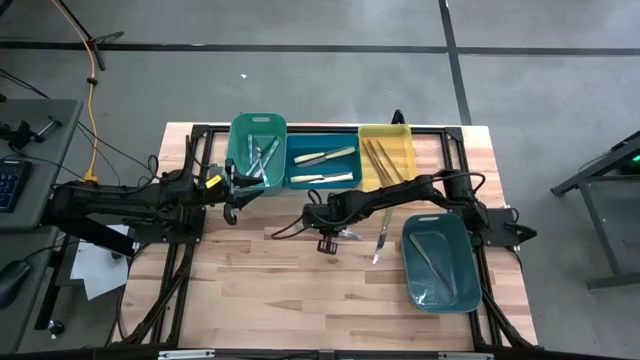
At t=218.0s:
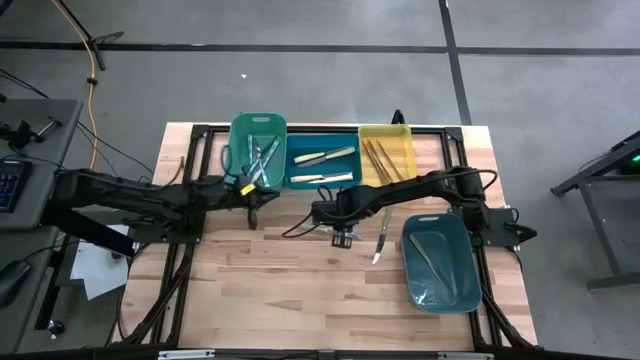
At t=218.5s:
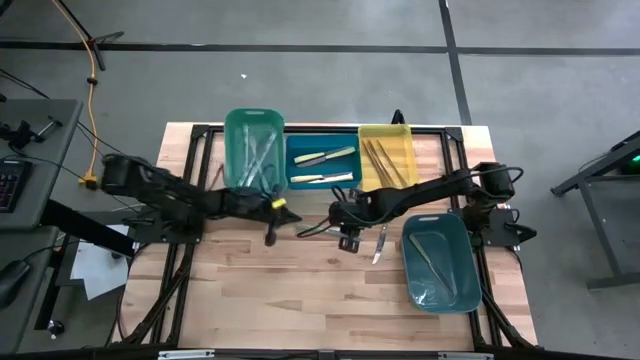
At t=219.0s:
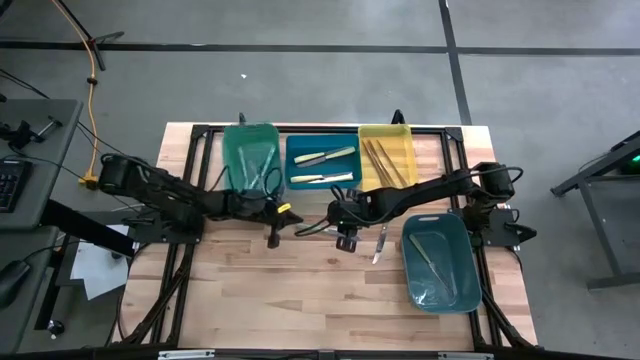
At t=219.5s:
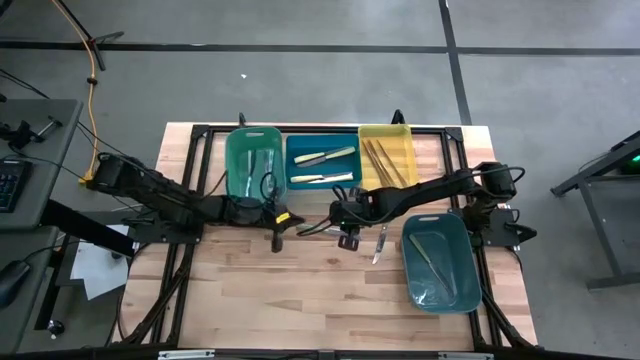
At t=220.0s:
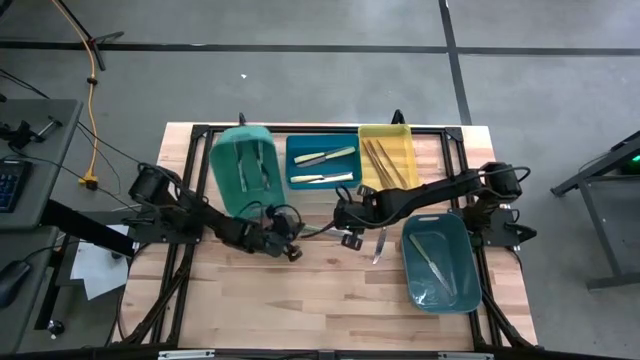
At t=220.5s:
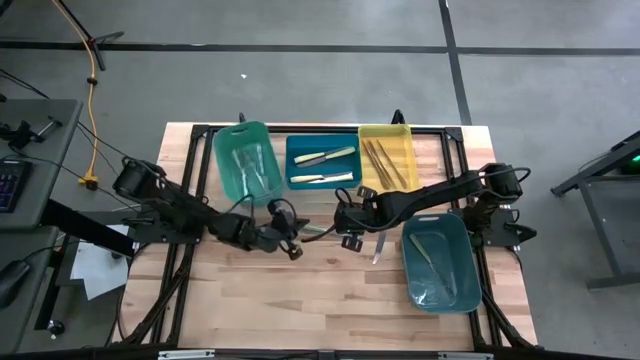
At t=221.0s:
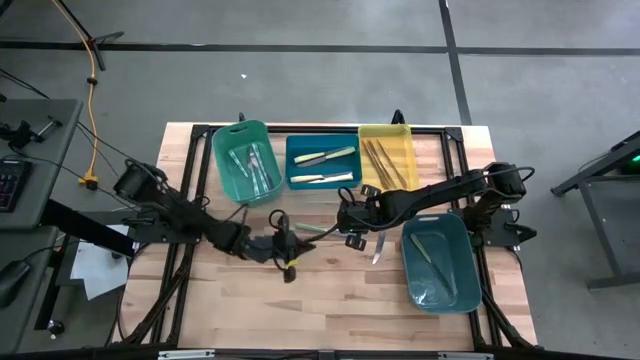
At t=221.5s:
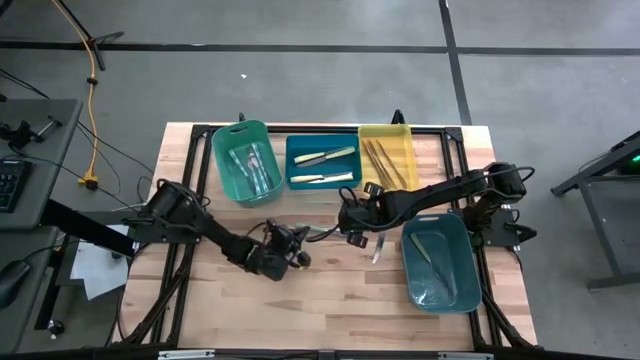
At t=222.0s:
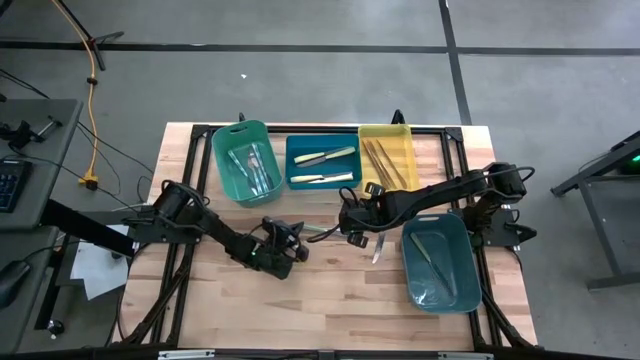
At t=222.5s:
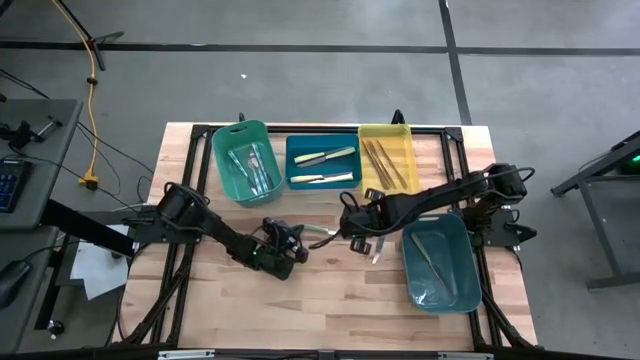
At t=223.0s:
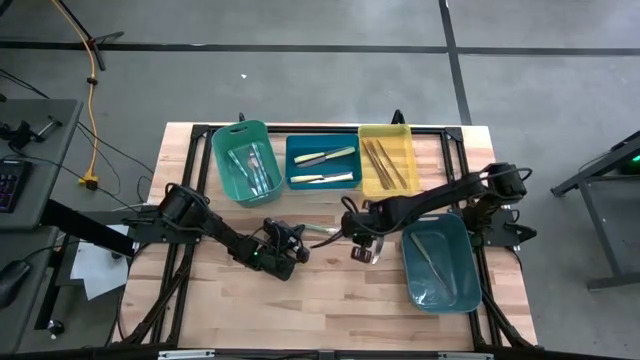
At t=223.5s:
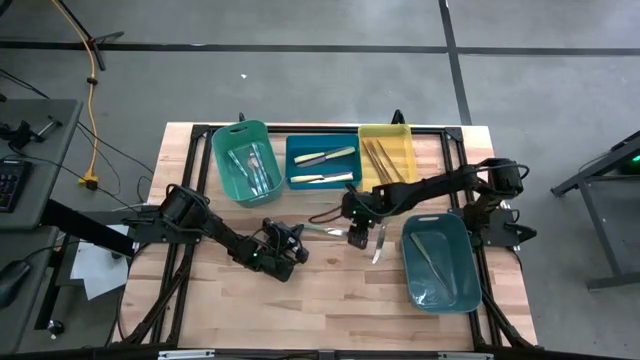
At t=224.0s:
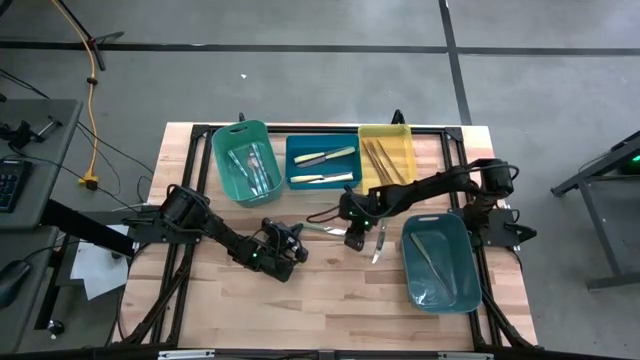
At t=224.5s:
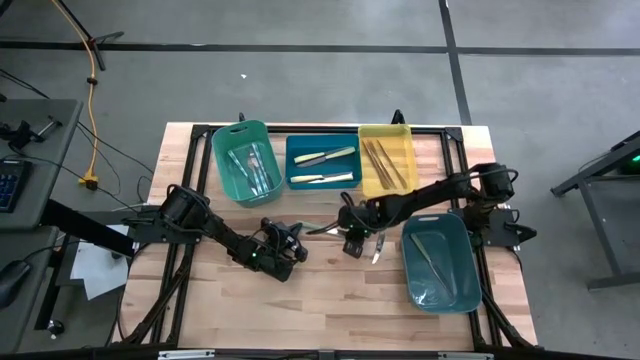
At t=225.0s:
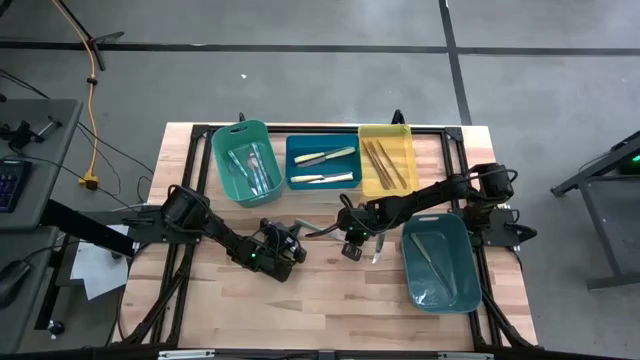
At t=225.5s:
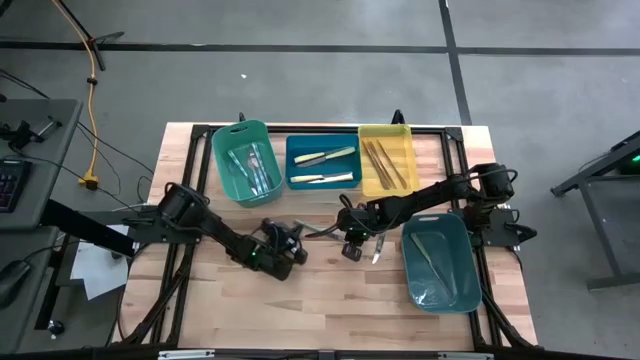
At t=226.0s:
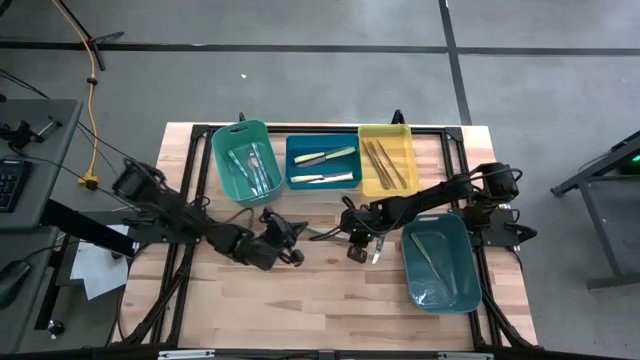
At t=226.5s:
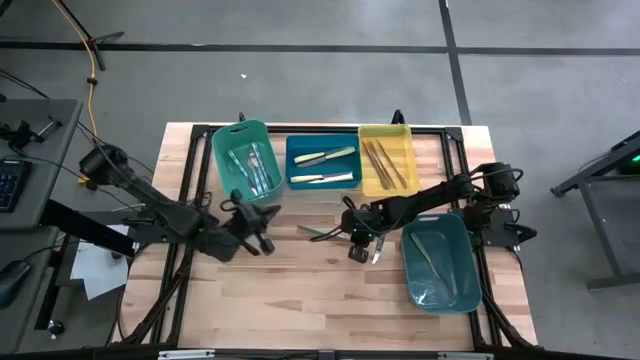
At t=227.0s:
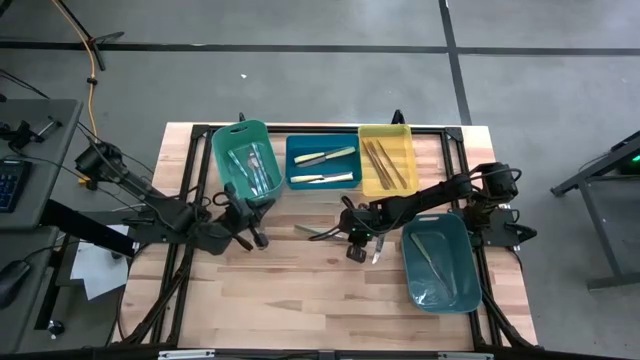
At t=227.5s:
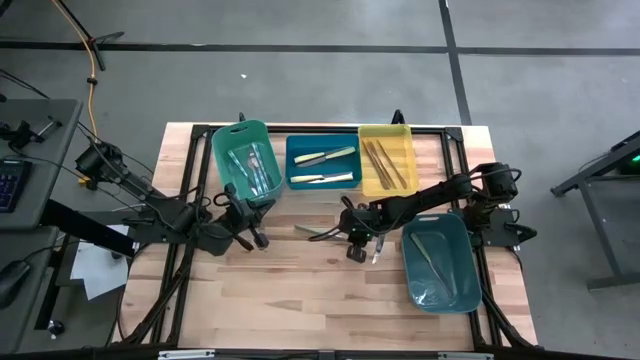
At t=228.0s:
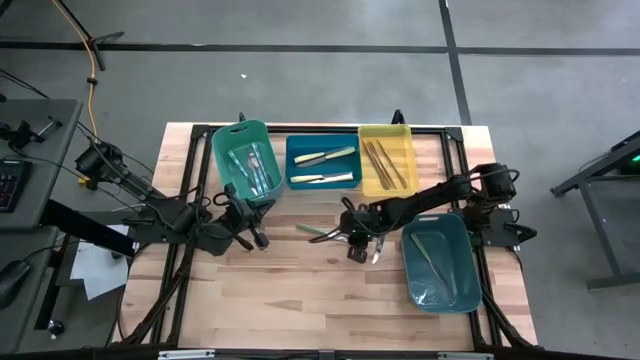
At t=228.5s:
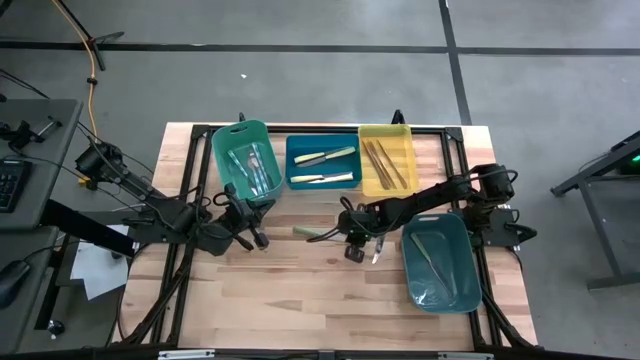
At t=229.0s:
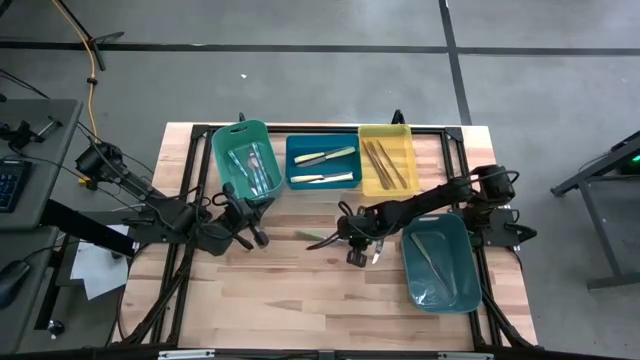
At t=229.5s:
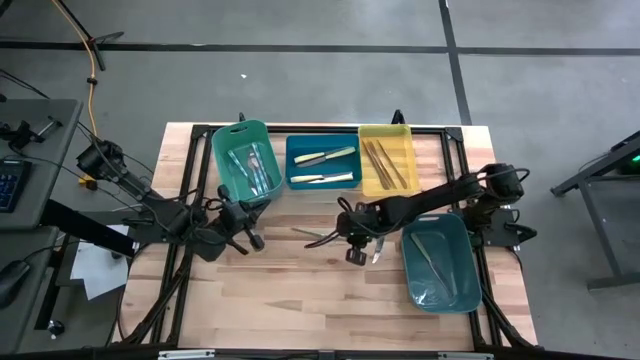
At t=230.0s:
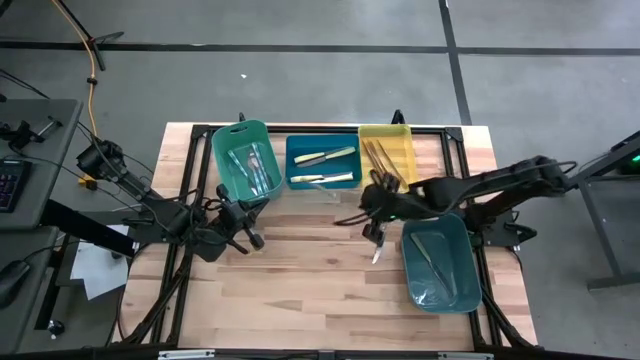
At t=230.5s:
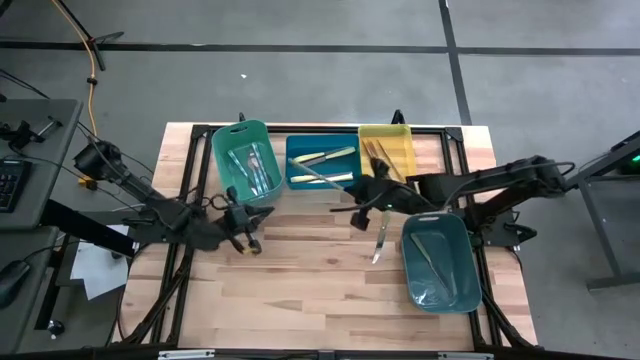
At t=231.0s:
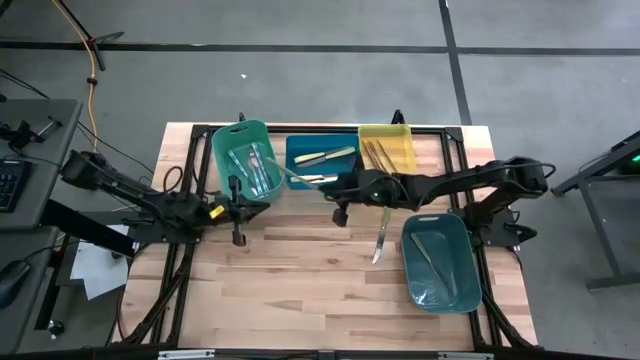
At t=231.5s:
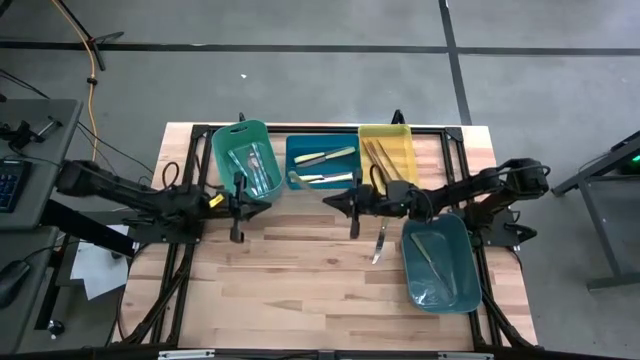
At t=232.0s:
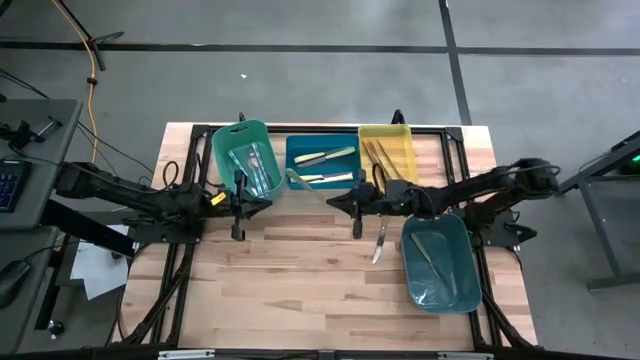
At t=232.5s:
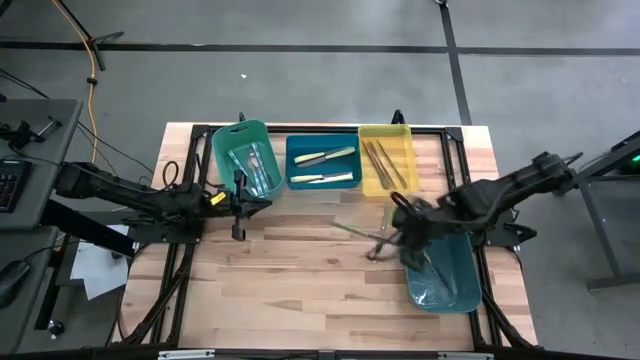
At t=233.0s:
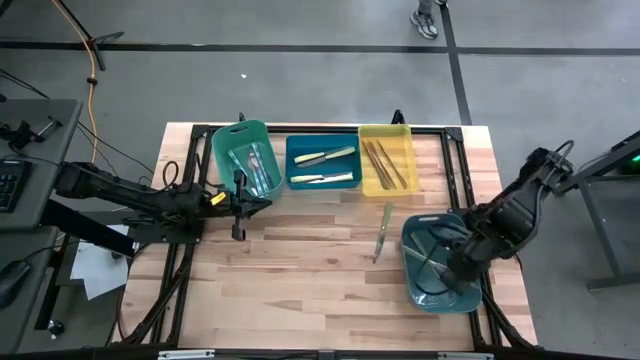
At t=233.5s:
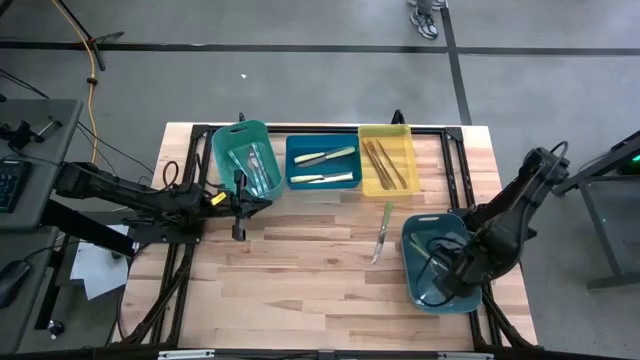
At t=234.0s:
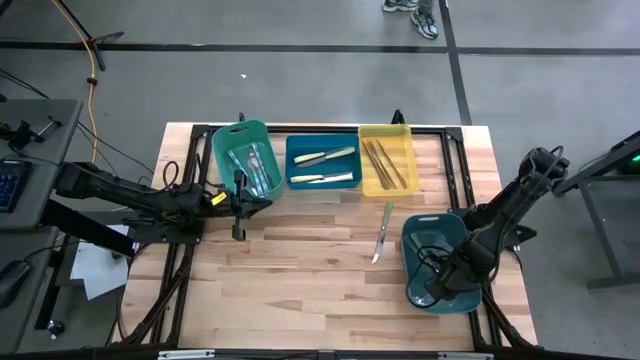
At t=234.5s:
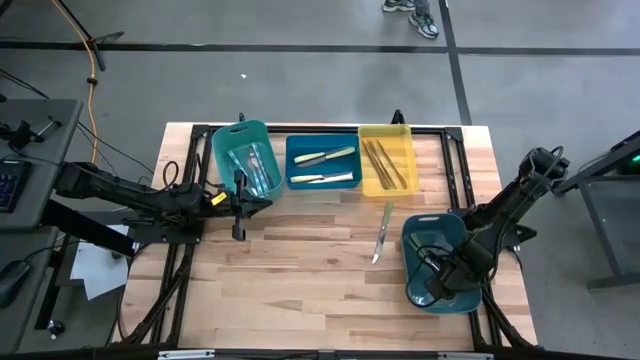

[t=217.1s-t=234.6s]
Task: Sort silverware by color (type)
Put the green knife into the green bin
